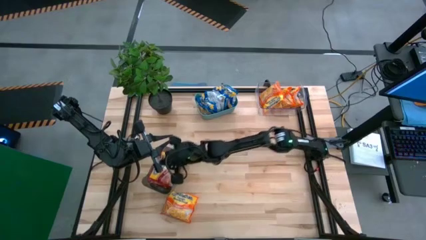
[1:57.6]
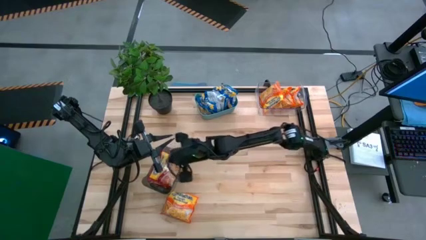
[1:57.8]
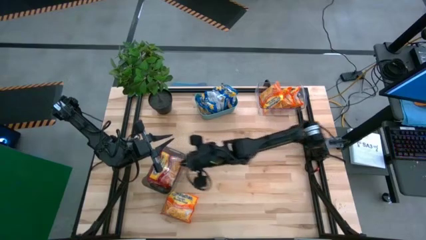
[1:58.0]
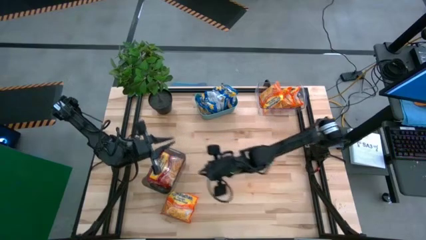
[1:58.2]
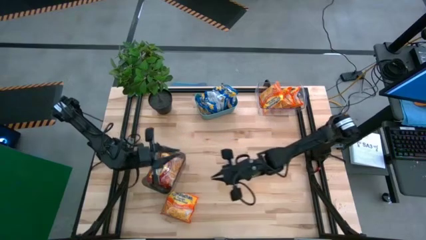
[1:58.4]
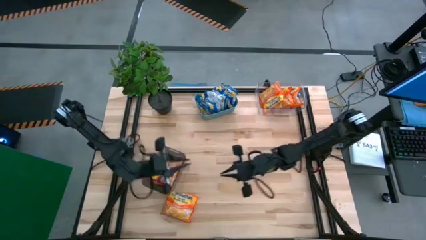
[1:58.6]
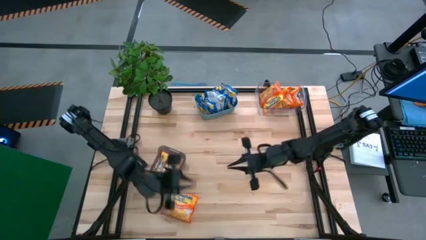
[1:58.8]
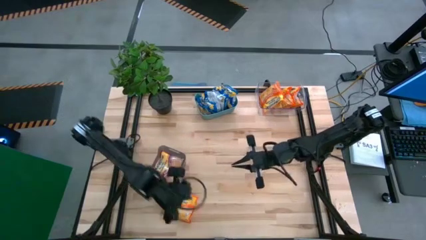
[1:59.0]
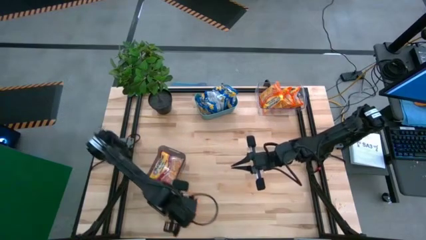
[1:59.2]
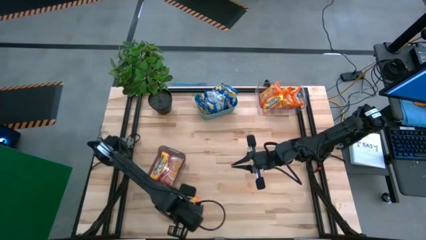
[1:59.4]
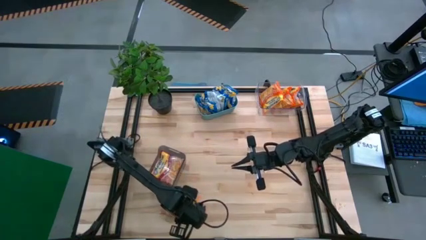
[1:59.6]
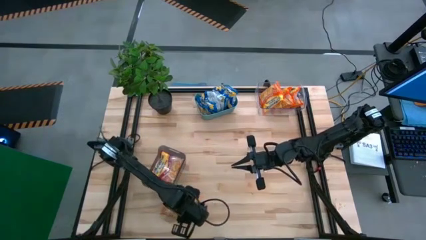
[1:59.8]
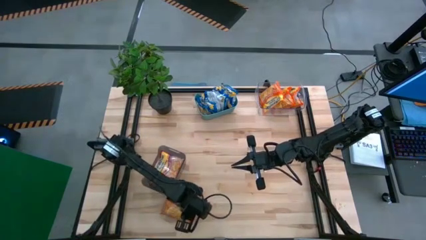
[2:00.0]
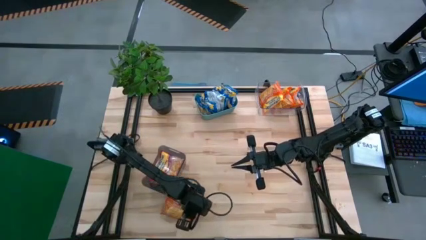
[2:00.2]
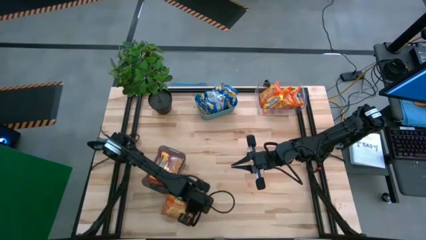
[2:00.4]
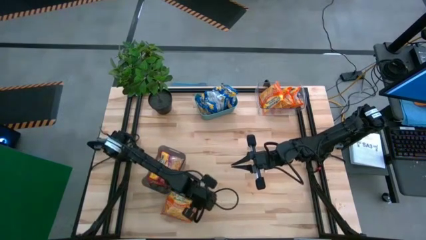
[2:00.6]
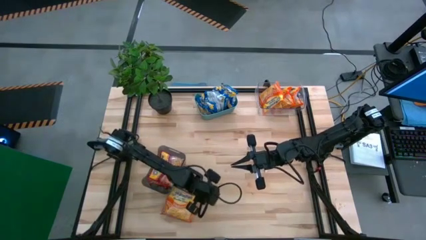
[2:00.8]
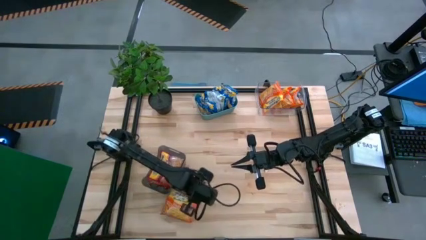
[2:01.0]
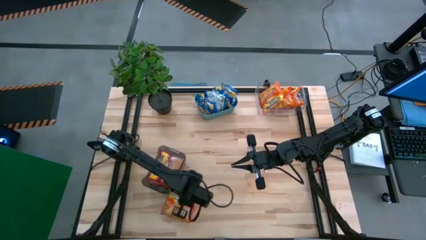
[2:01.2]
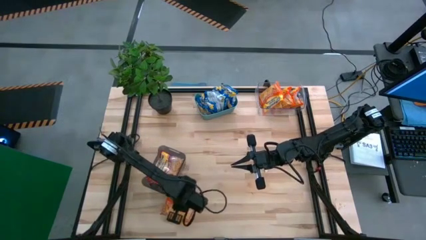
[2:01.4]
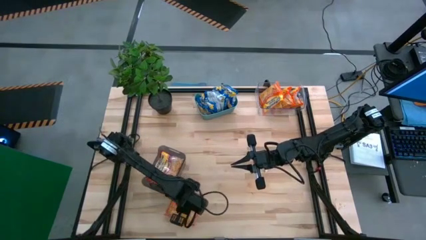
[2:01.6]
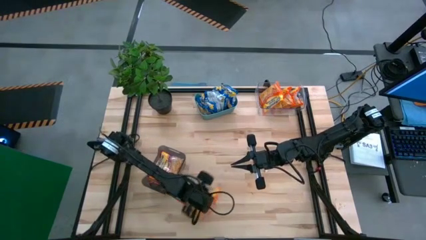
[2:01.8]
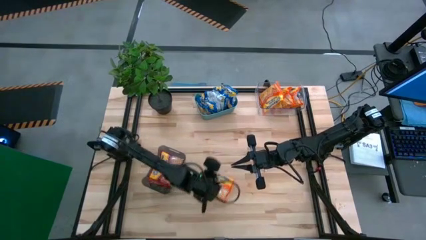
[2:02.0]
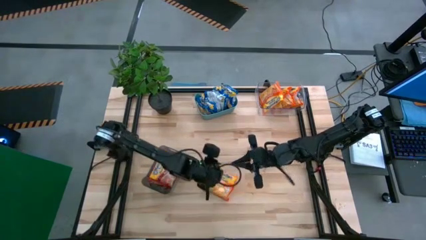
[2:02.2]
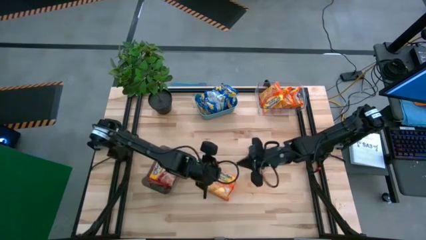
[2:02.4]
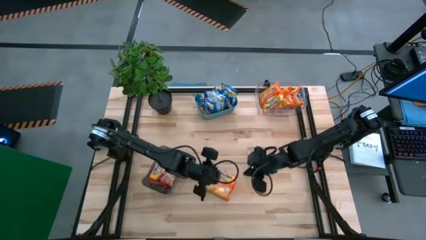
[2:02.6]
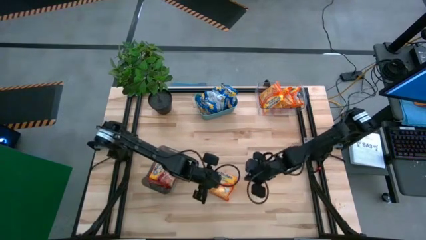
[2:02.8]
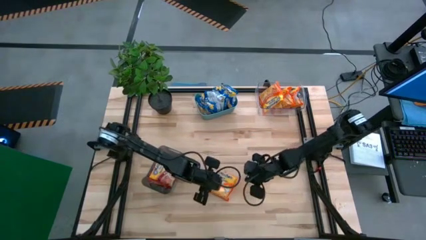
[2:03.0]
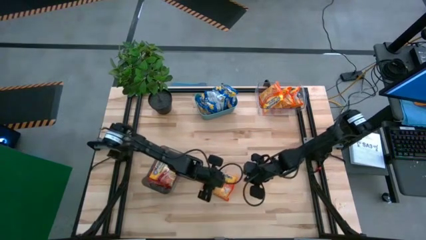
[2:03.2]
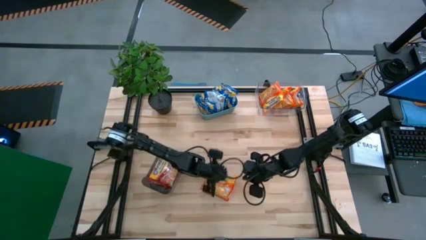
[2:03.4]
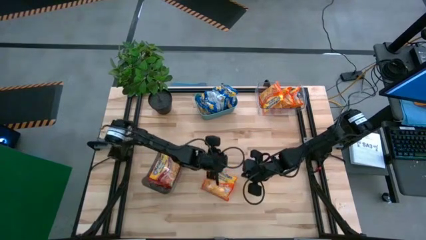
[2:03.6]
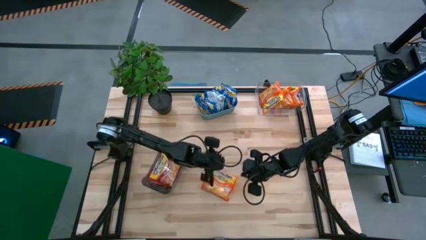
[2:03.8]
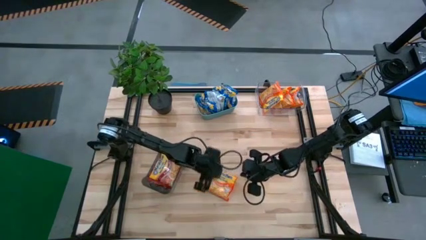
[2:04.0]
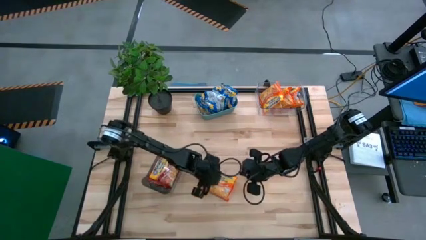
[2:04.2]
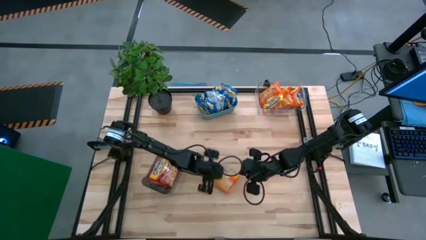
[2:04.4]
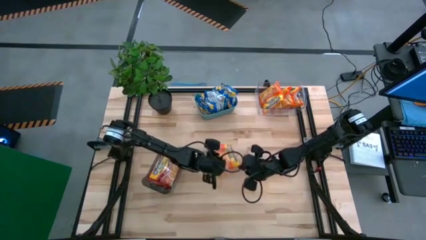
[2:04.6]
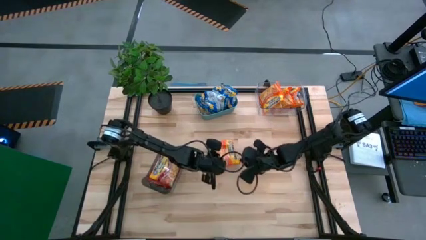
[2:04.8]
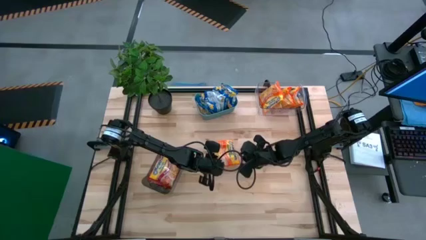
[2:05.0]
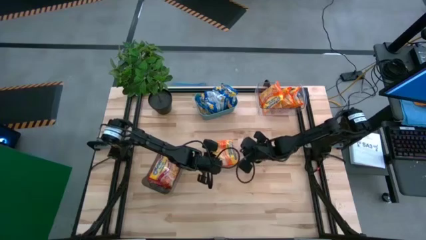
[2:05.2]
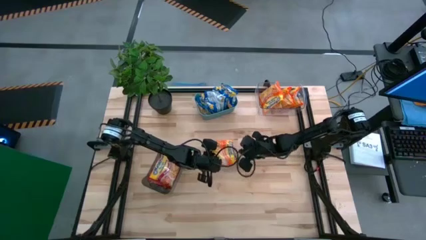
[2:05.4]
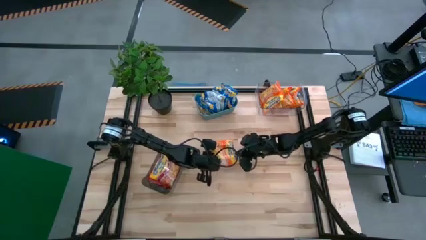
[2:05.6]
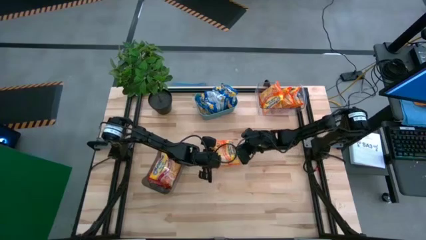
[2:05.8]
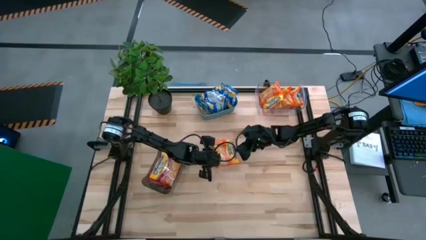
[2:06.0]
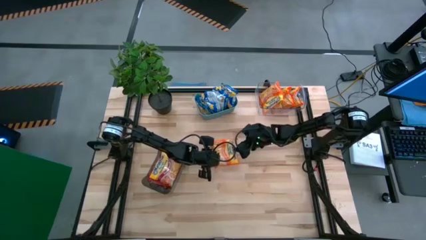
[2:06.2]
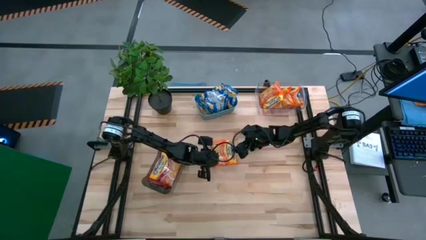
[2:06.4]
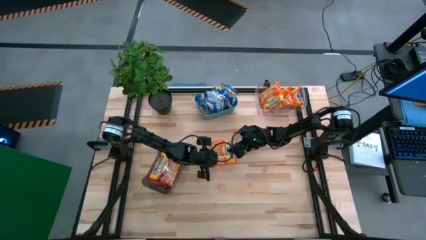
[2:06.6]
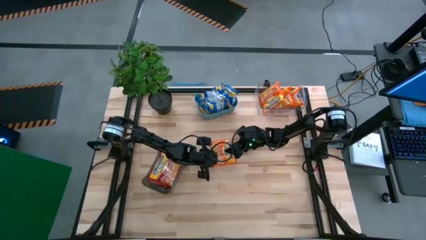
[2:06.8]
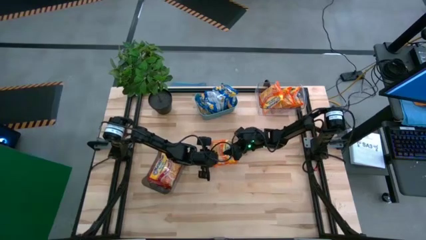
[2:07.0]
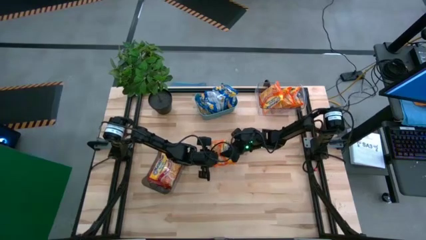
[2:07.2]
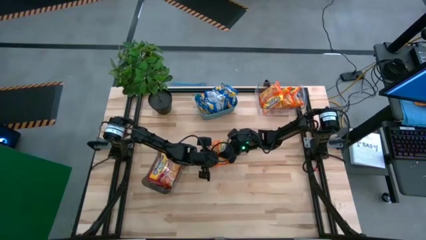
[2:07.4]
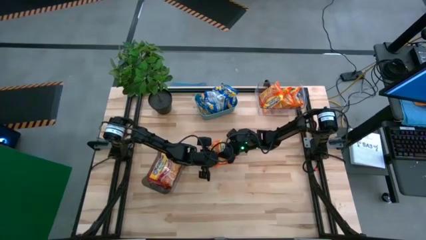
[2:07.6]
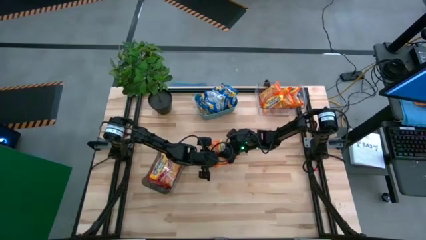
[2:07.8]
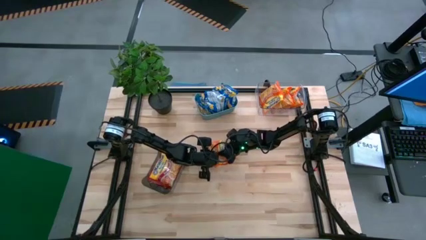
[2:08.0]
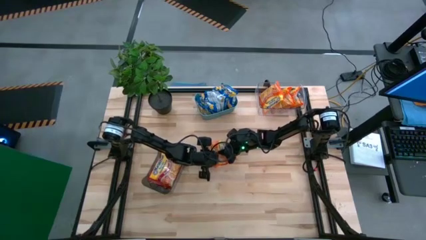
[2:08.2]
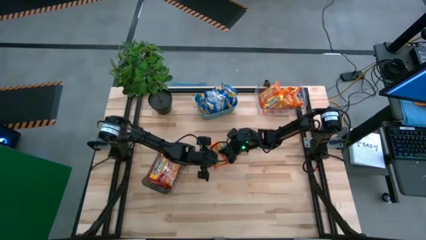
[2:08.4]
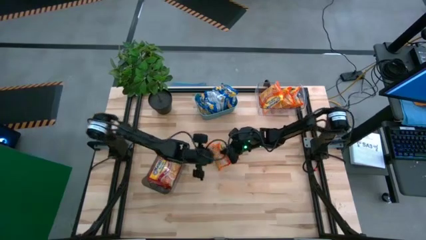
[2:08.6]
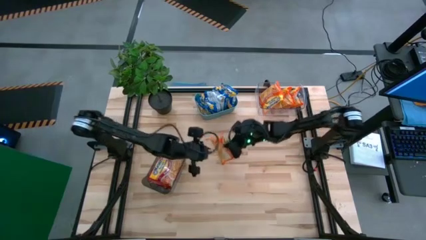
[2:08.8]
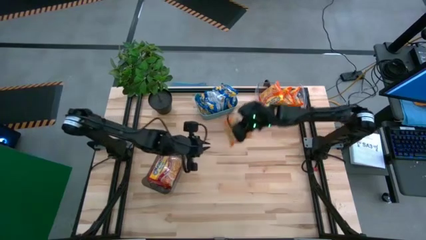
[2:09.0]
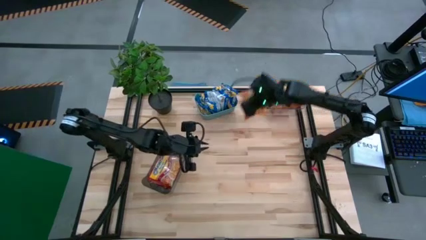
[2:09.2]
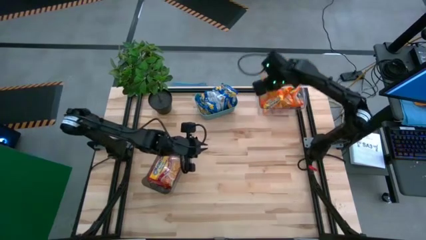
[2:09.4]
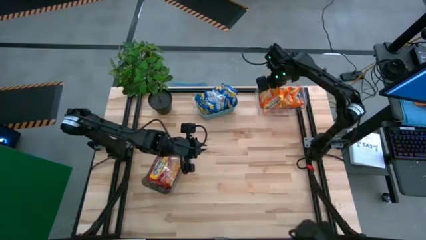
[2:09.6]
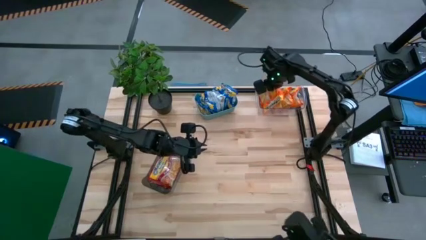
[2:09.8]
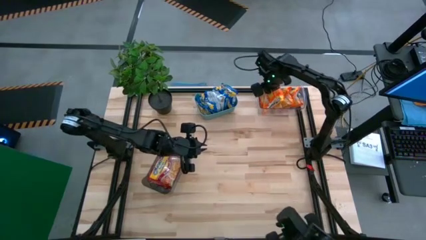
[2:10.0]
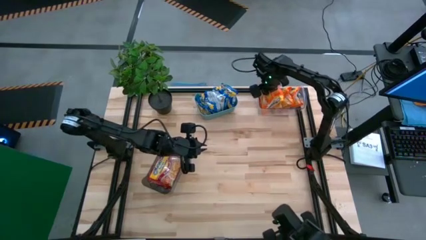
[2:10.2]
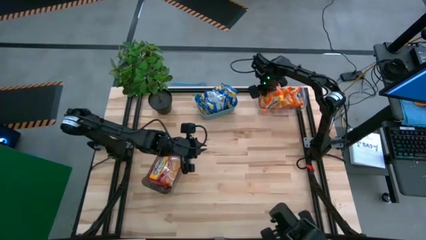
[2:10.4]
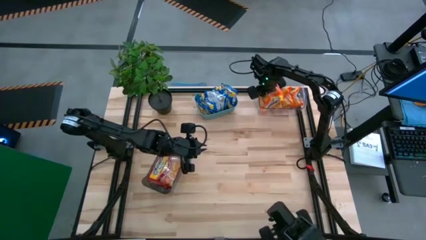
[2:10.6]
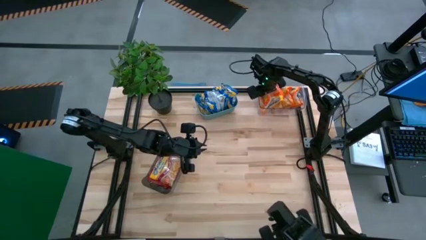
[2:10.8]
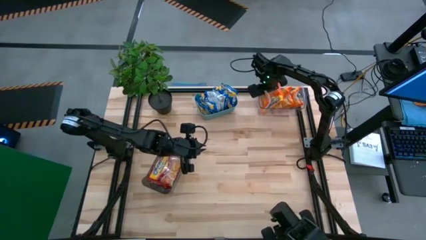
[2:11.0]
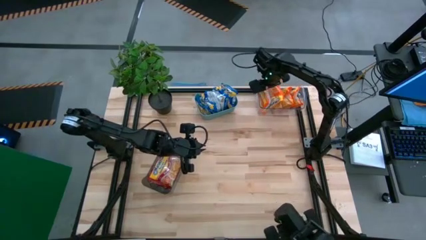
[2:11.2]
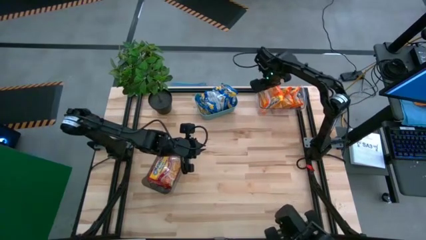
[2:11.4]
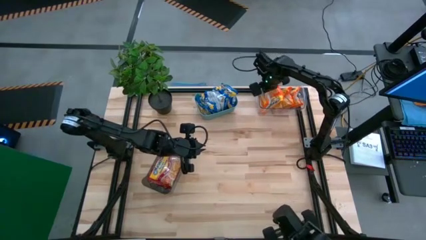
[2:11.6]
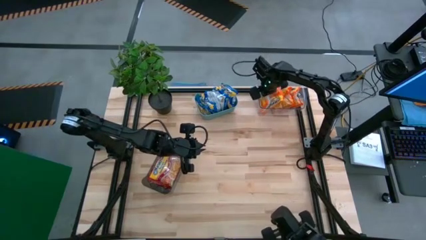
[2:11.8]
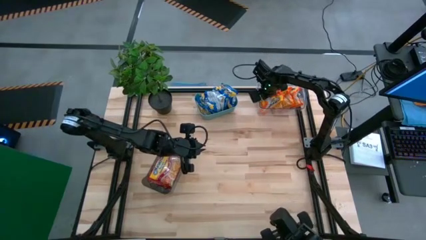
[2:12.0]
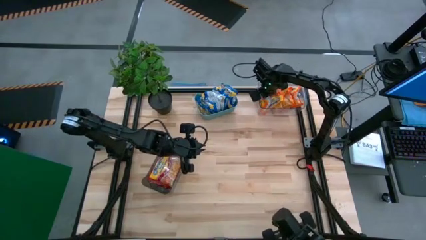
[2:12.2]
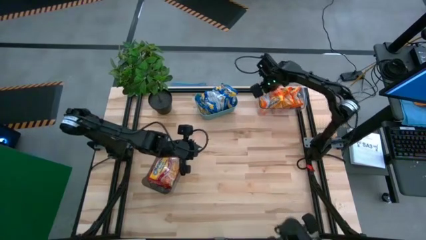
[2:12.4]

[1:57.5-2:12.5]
Task: Sort Maruchan noodles
Put the orange noodle pack into the transparent bin

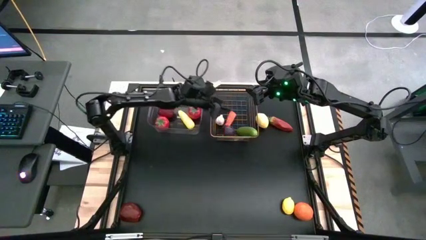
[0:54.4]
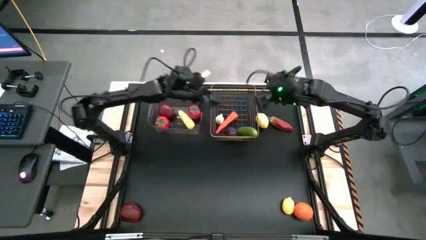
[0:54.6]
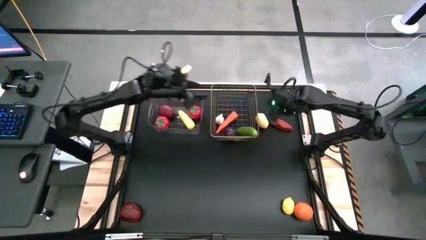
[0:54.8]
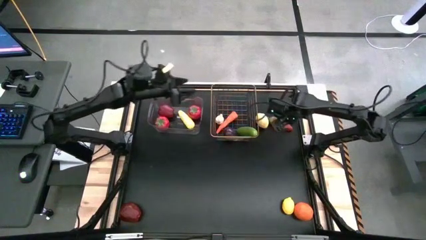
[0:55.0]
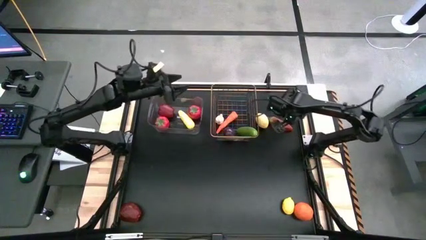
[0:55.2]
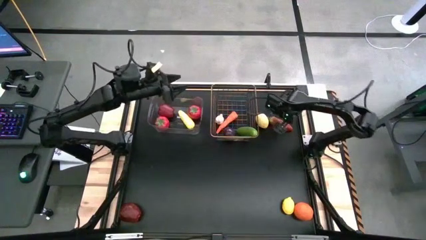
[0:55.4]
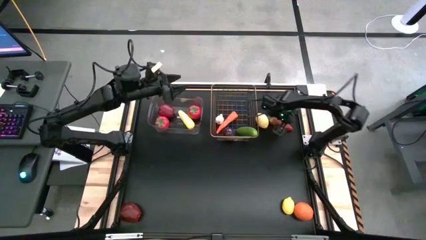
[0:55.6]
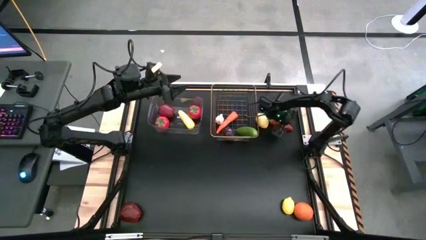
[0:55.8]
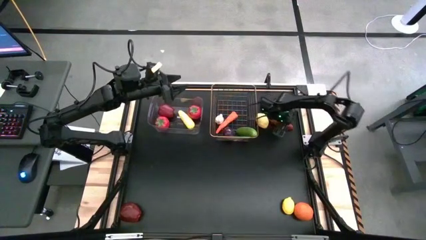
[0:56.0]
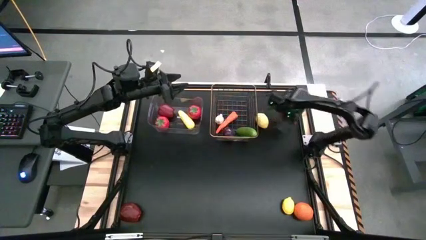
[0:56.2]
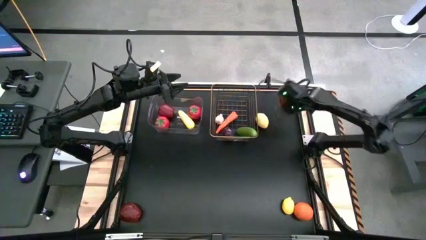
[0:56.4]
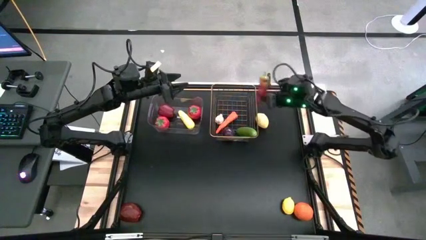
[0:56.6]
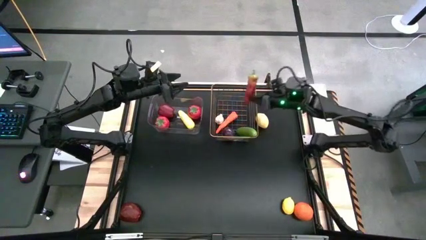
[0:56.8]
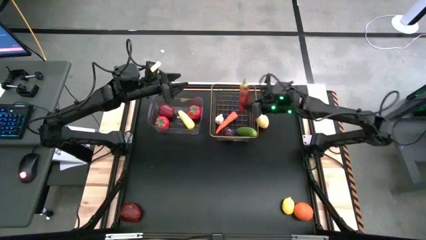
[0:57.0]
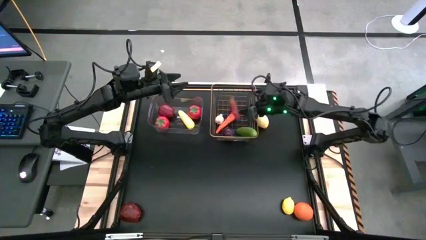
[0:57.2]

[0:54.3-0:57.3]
Task: Sort produce into baskets
Put the pepper into the gold wire basket
